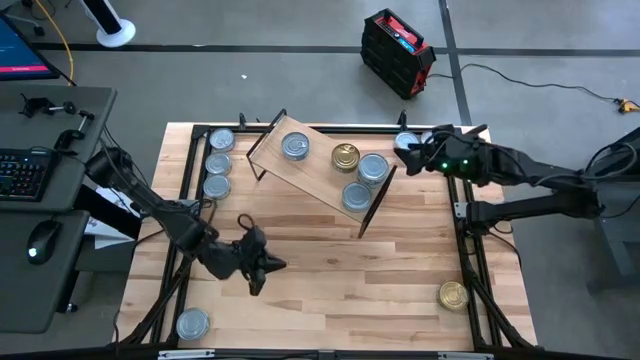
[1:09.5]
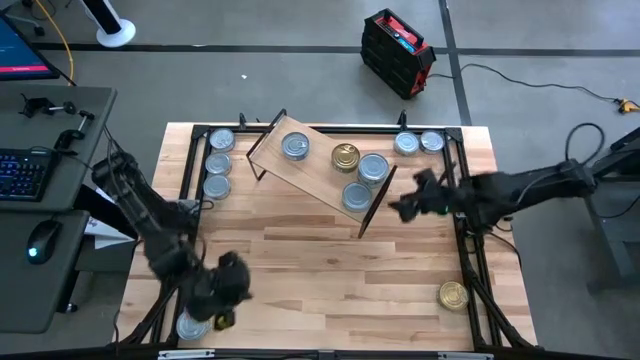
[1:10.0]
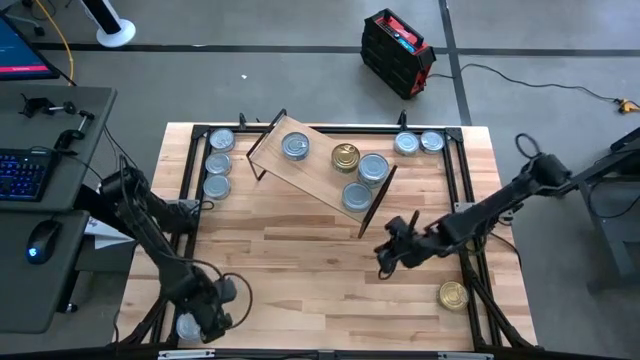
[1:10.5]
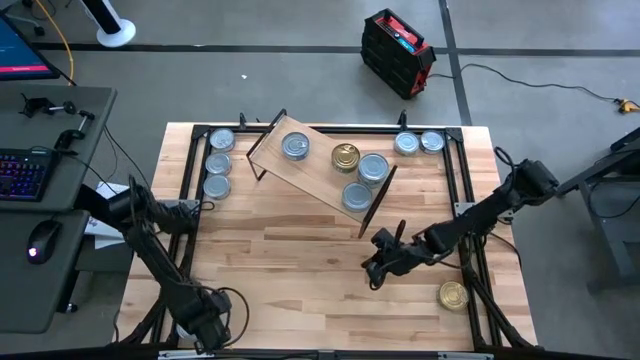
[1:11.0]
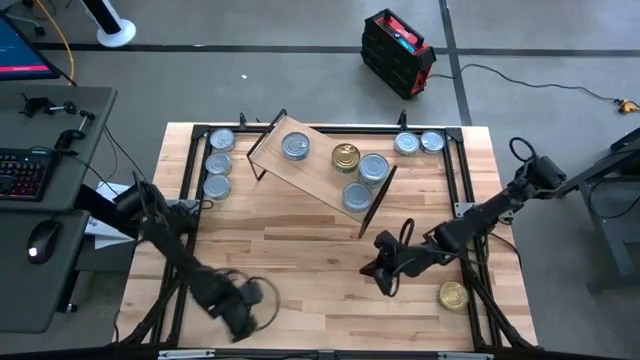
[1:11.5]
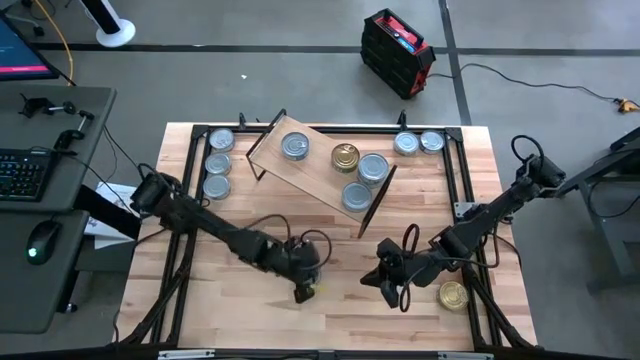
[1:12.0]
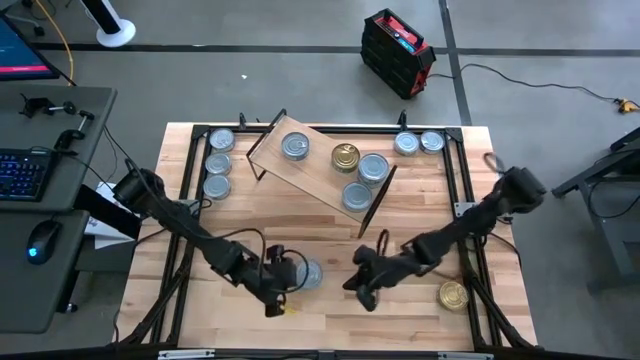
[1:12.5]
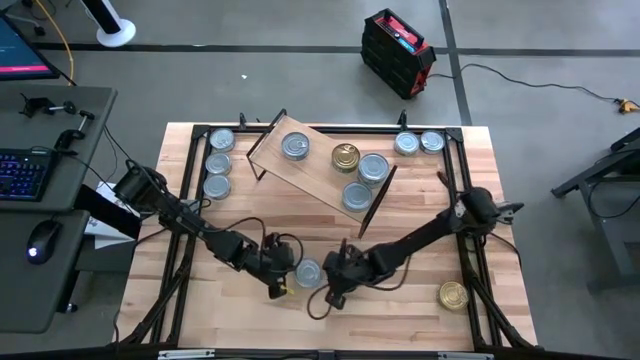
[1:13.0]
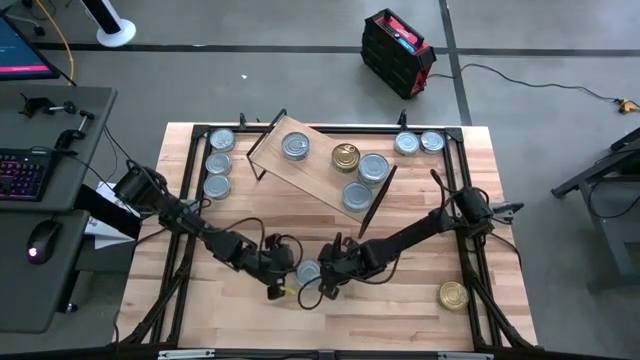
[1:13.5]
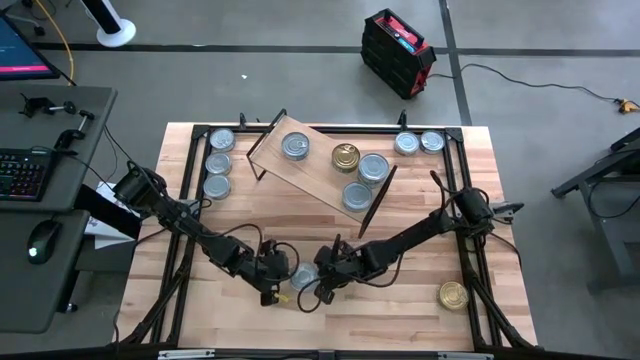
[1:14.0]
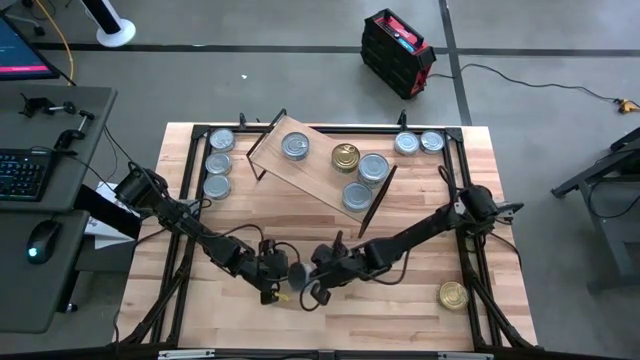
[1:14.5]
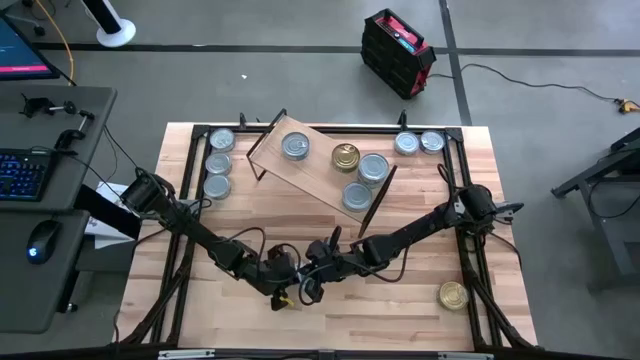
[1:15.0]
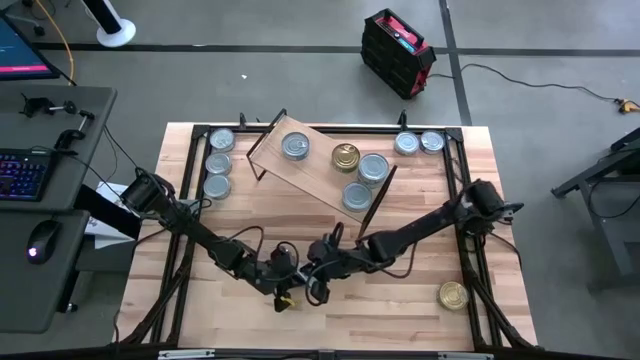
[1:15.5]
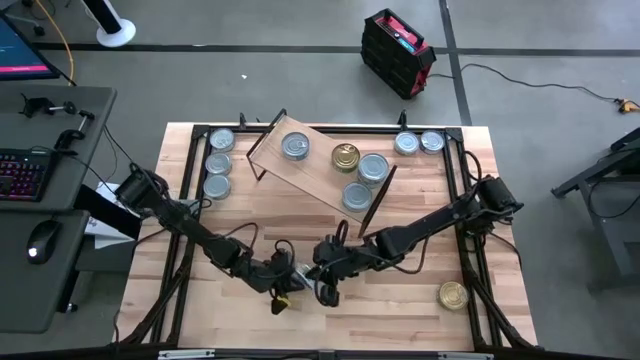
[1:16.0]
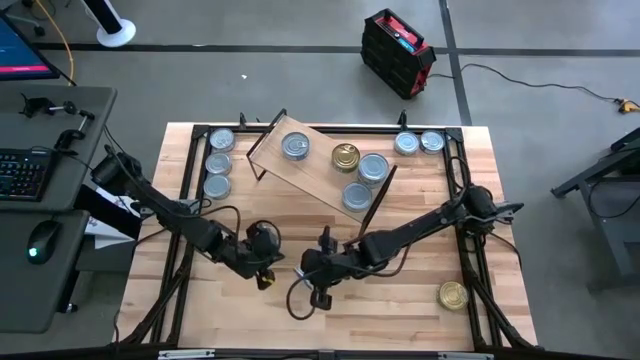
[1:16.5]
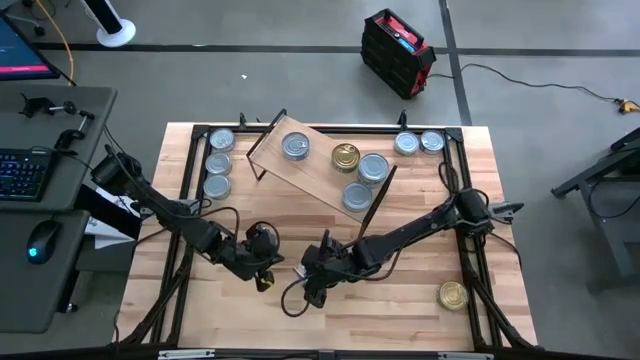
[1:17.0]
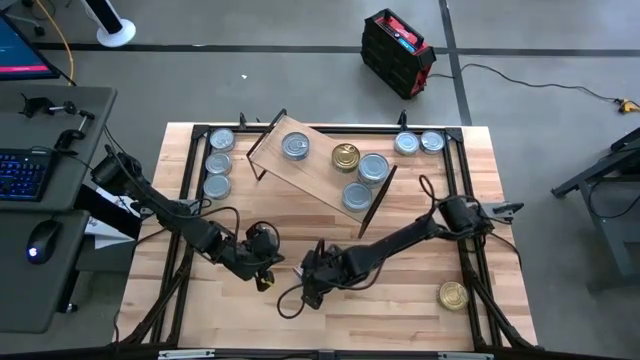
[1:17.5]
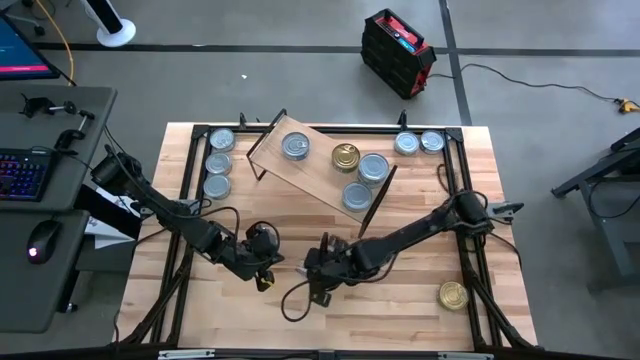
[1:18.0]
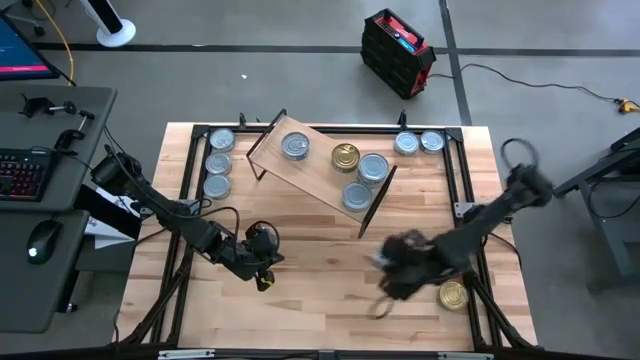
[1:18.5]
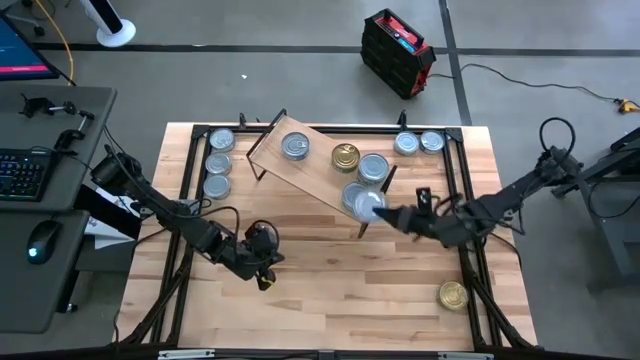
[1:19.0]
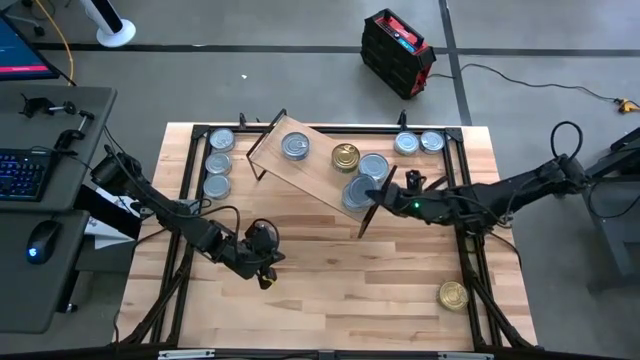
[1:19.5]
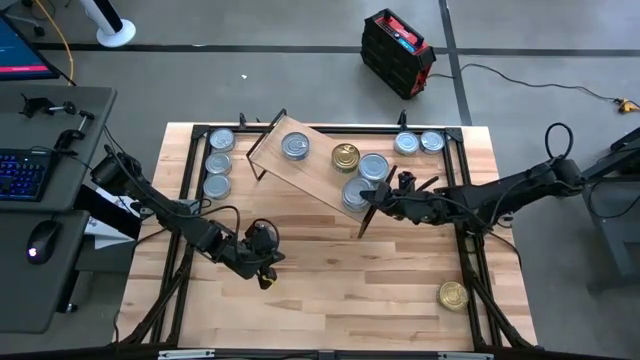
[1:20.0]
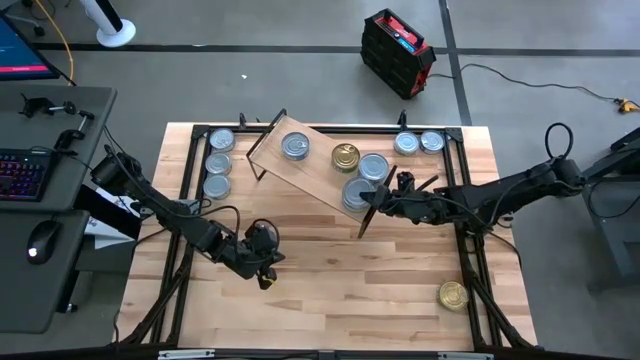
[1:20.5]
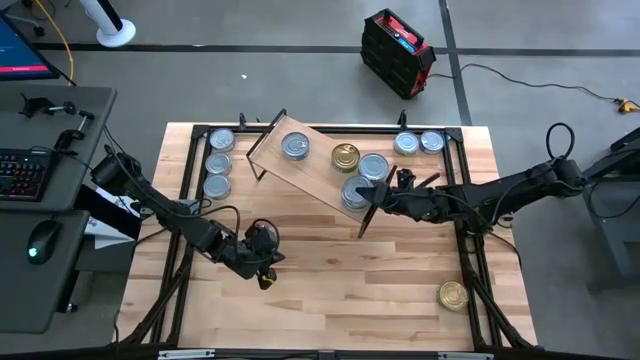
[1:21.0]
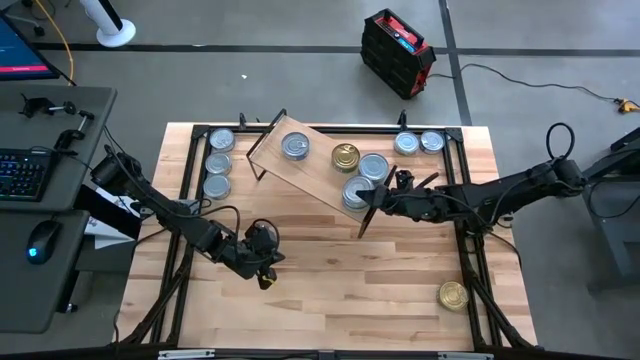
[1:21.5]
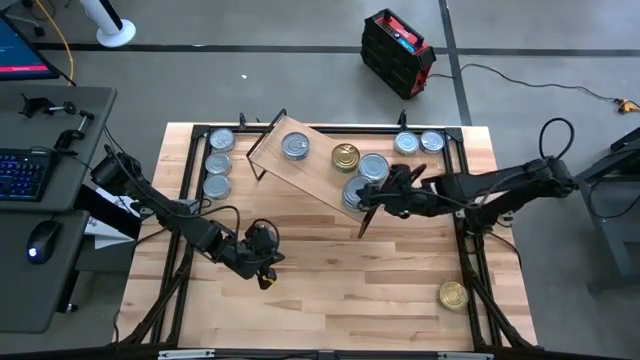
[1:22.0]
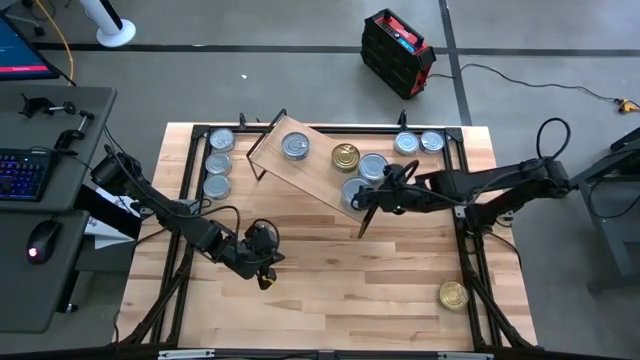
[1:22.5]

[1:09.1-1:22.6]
Task: Stack canned seafood by type on shelf
Stack the white-green tuna can on top of the other white-green tuna cans on the shelf

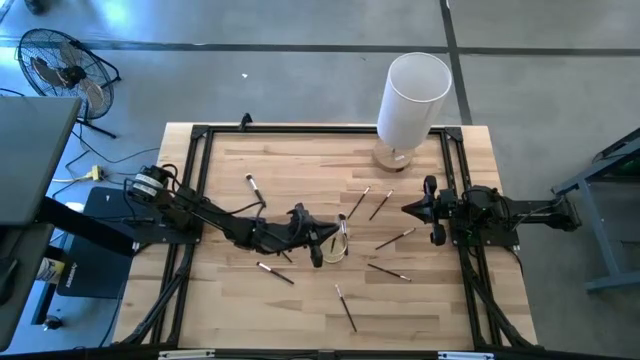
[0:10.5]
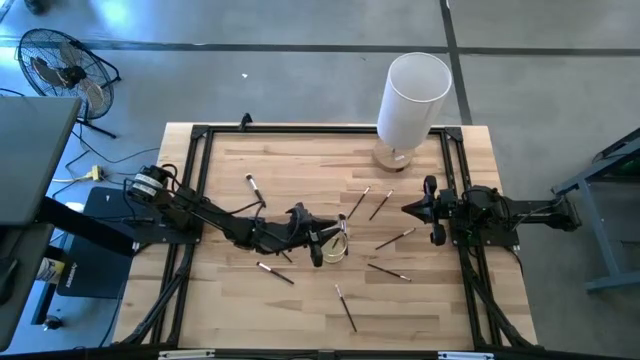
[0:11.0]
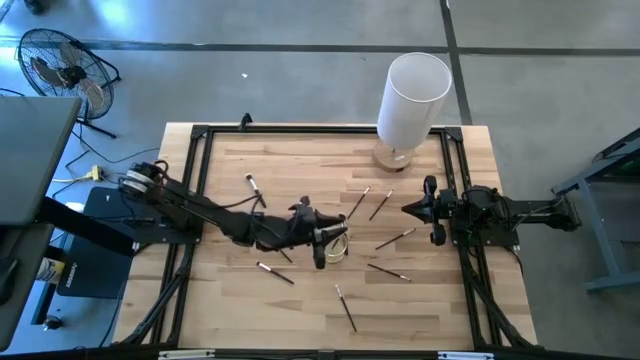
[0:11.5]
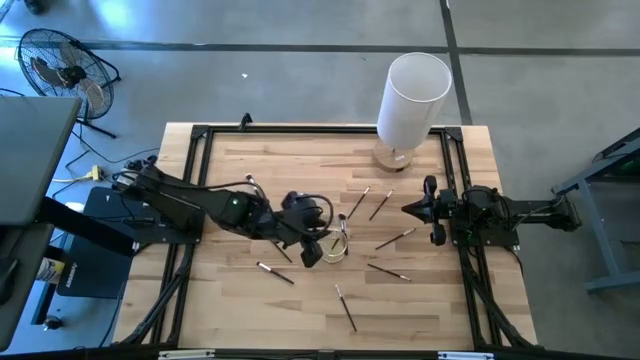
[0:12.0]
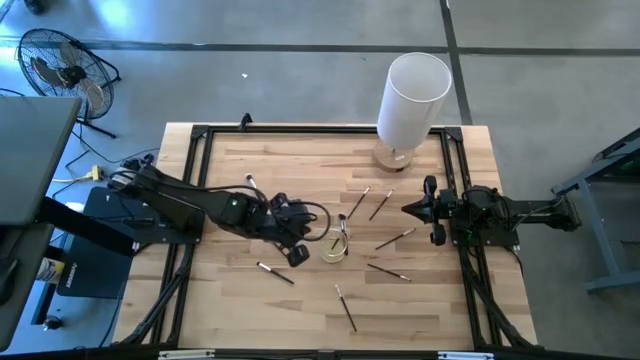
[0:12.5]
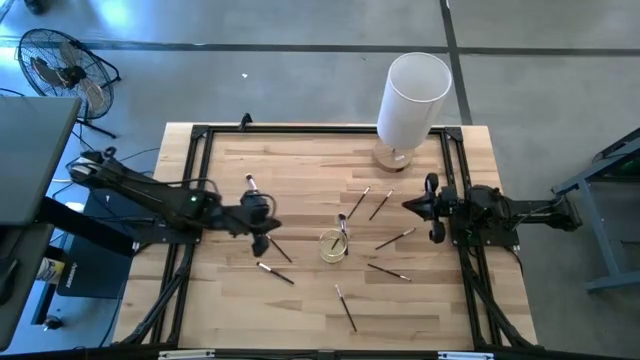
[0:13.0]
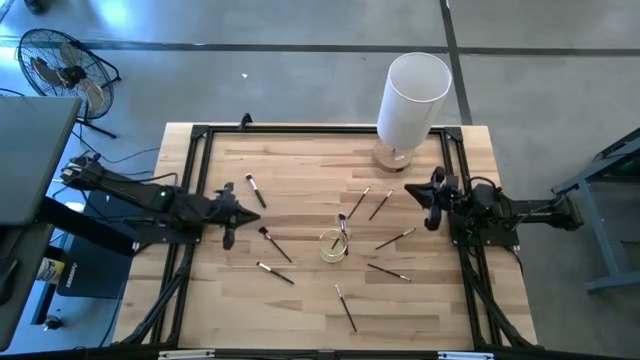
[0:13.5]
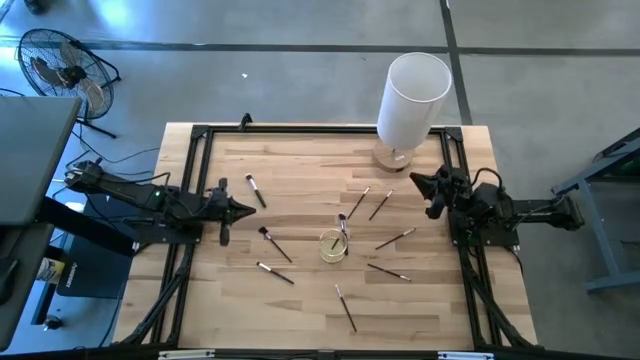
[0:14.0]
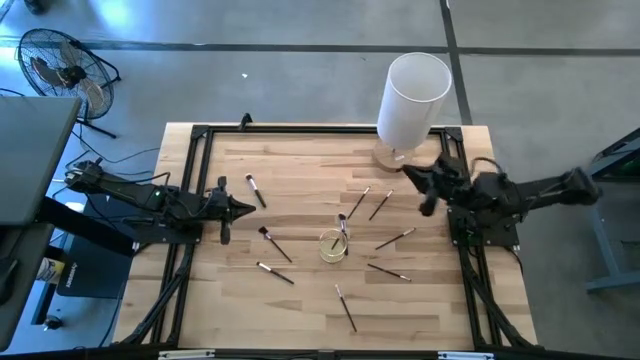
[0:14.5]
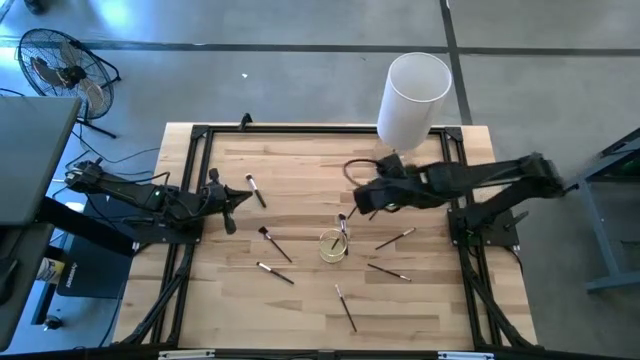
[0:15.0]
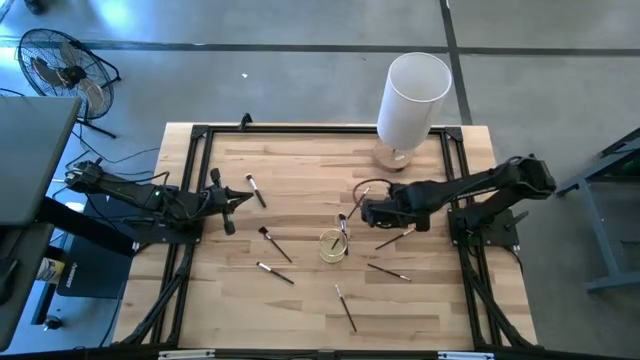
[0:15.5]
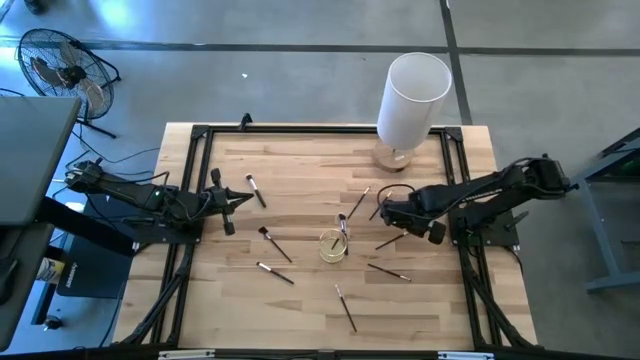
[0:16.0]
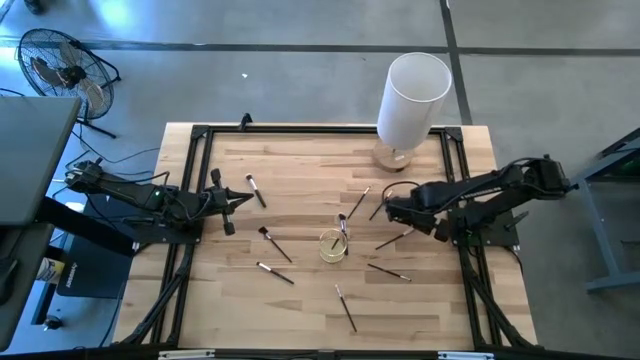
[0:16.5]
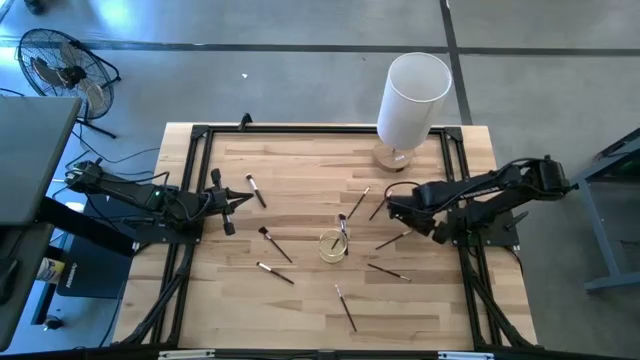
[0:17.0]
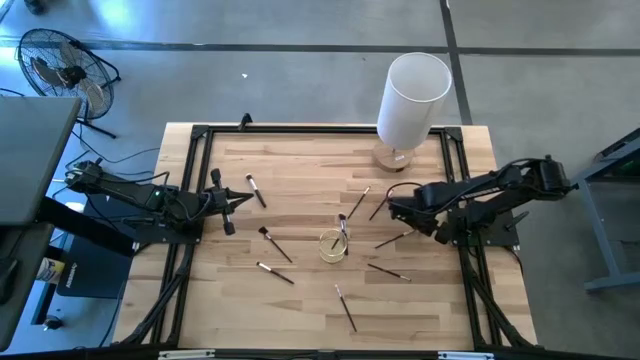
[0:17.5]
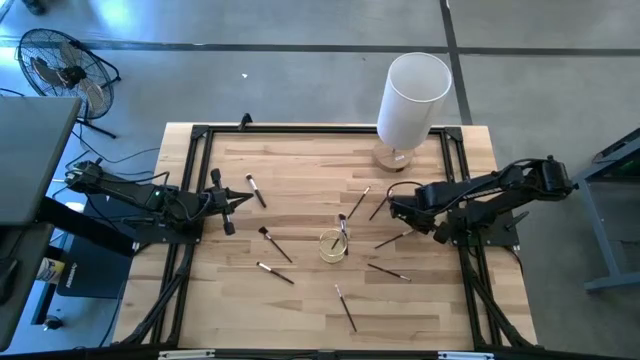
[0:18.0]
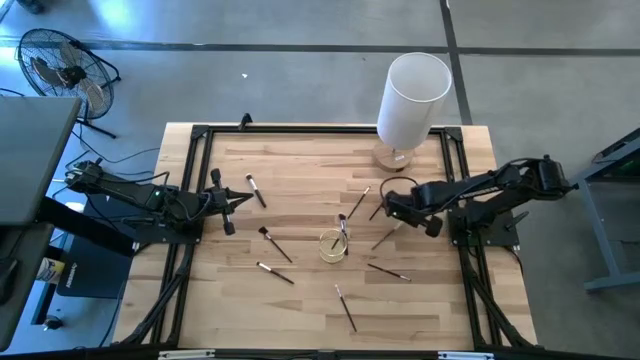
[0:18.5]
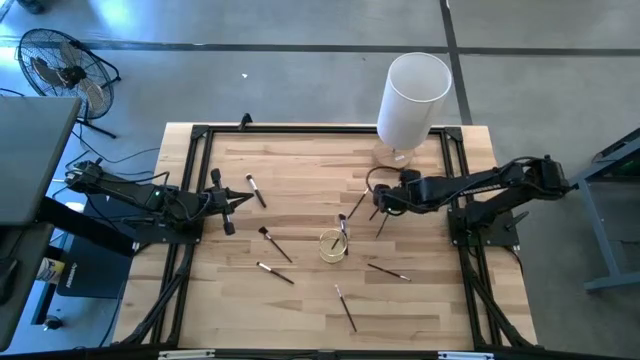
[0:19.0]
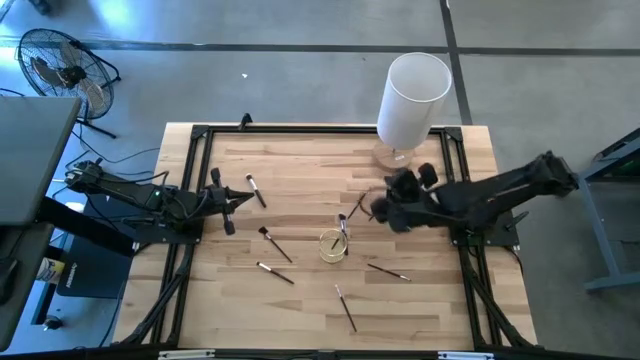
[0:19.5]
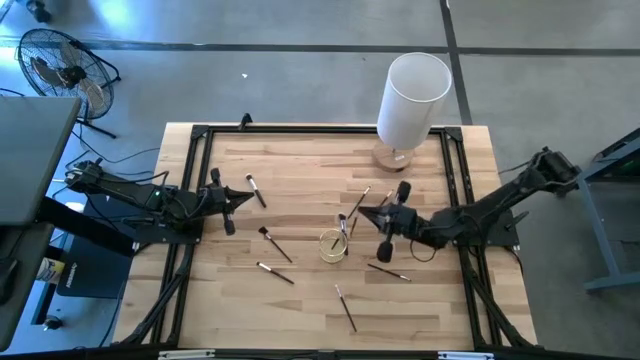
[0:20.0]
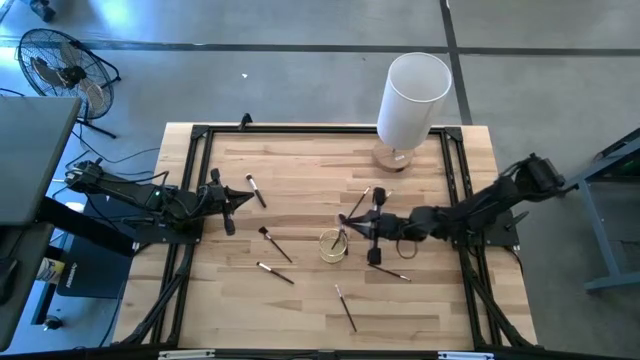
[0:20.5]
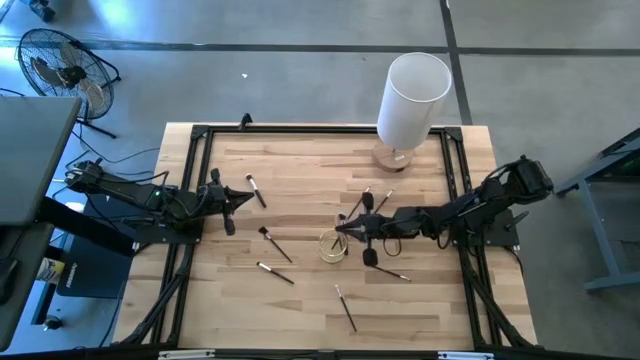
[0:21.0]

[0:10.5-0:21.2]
Task: Put items in baskets/containers
Put the eyeshadow brush into the mesh organizer
